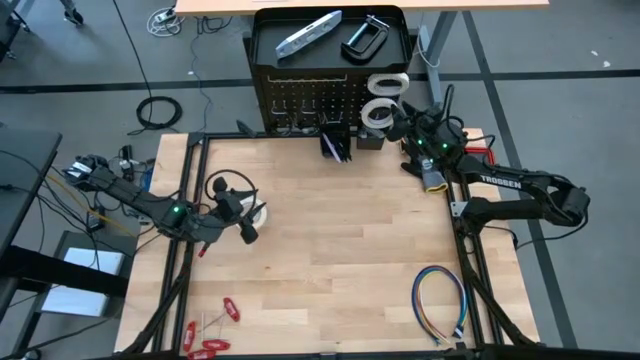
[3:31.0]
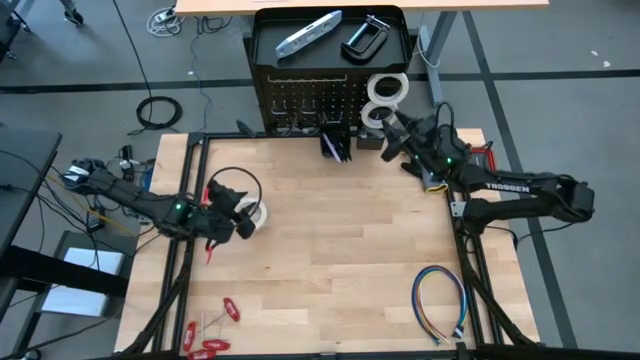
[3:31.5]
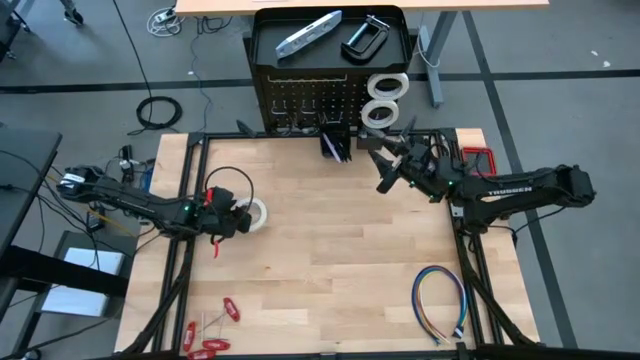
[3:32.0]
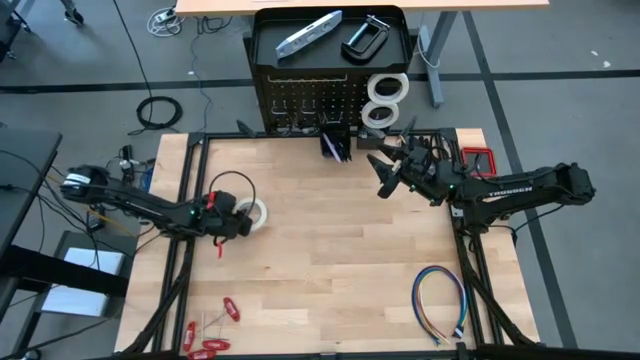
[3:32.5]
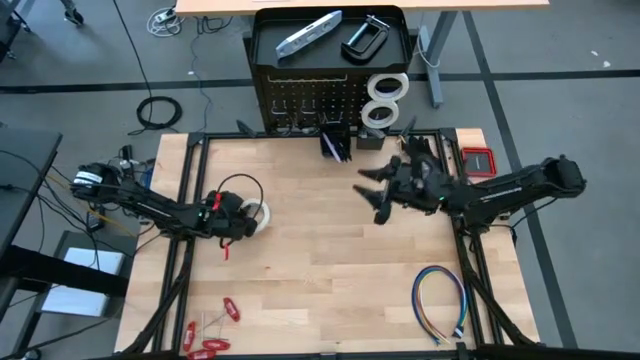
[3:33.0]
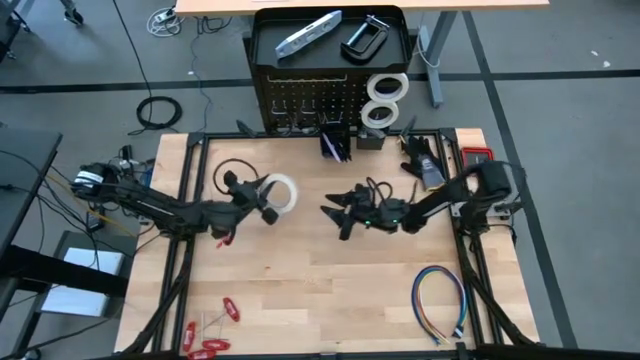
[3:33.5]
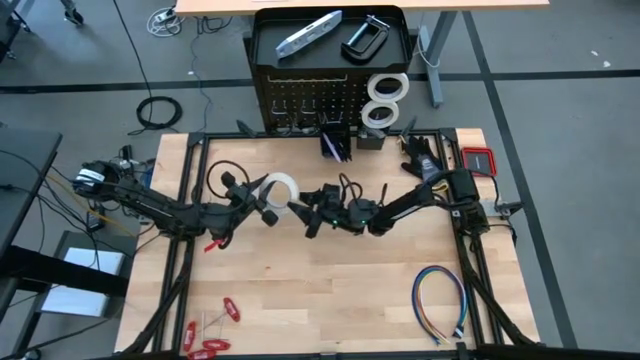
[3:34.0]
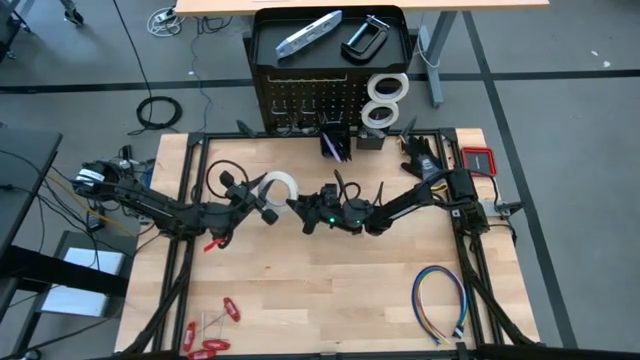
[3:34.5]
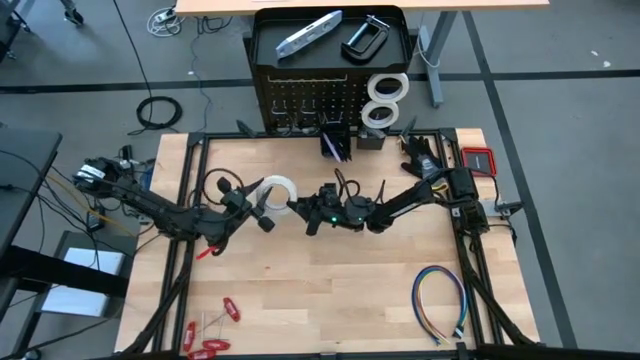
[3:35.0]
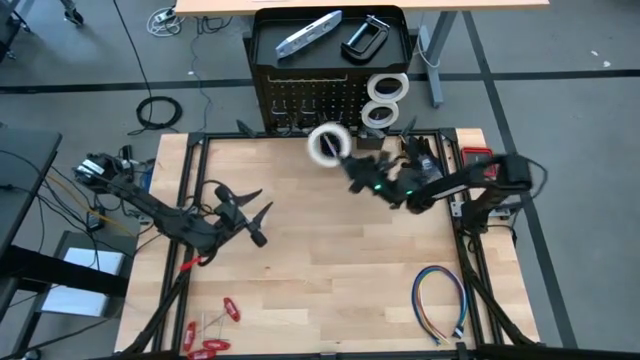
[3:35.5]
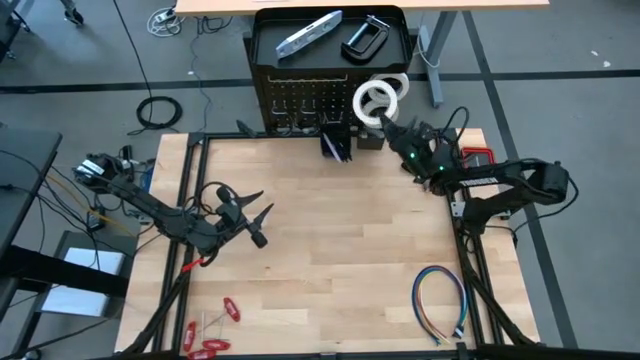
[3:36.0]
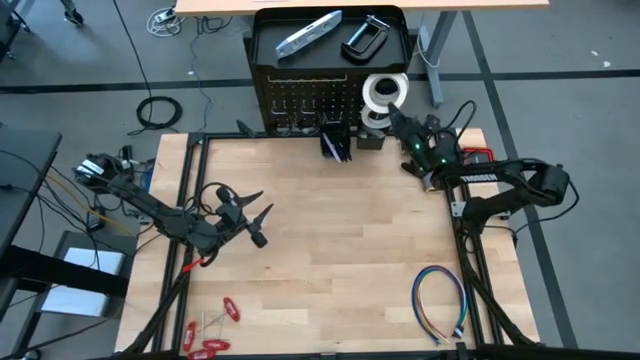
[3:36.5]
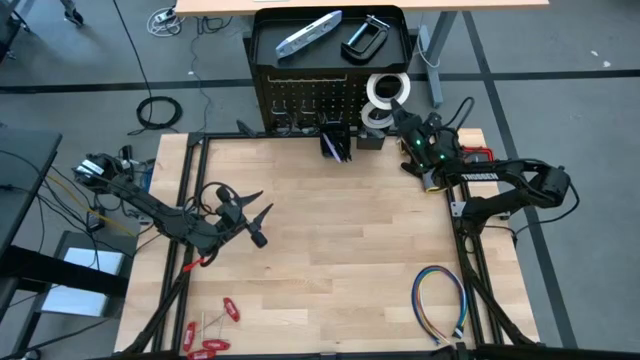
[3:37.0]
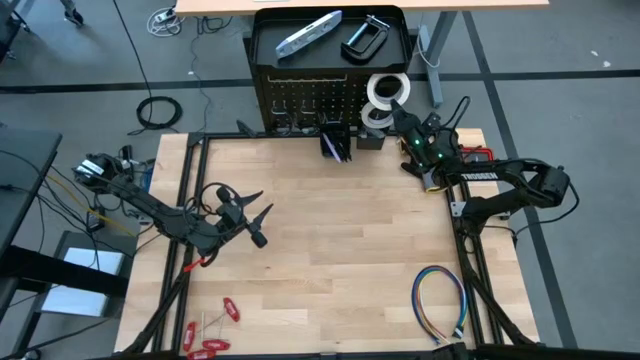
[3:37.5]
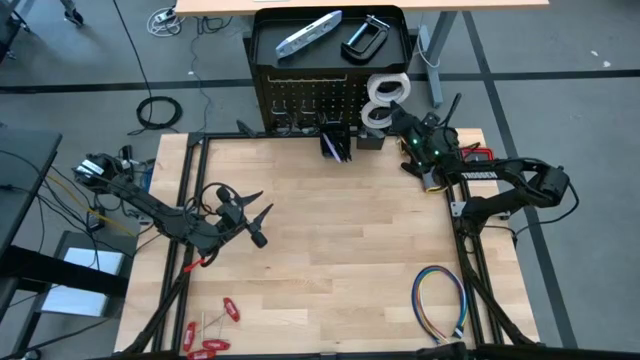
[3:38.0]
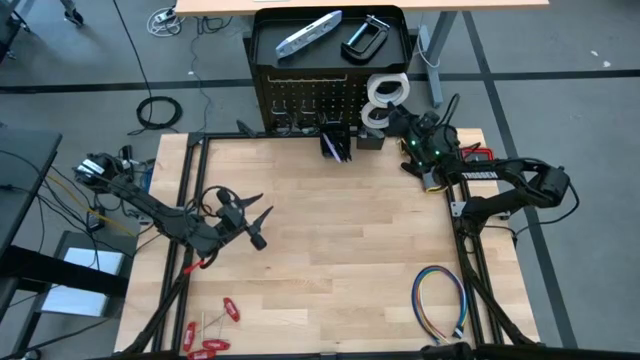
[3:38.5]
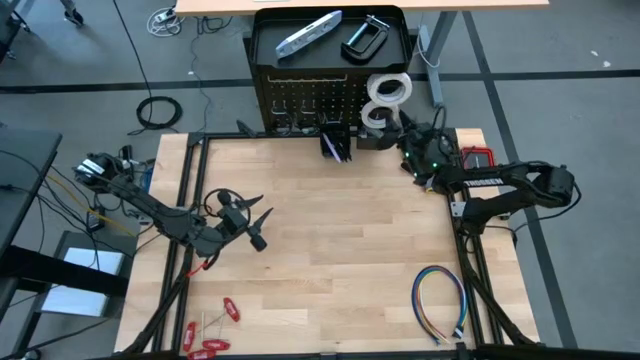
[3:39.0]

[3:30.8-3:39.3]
Task: Hang tools onto peg board
Hang the white masking tape on the peg board

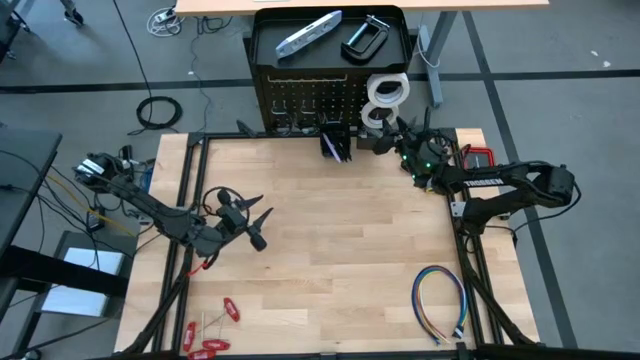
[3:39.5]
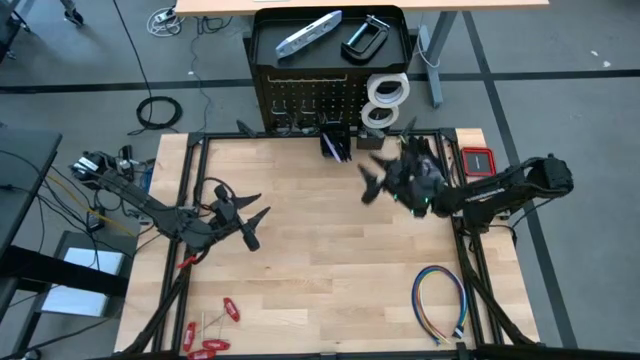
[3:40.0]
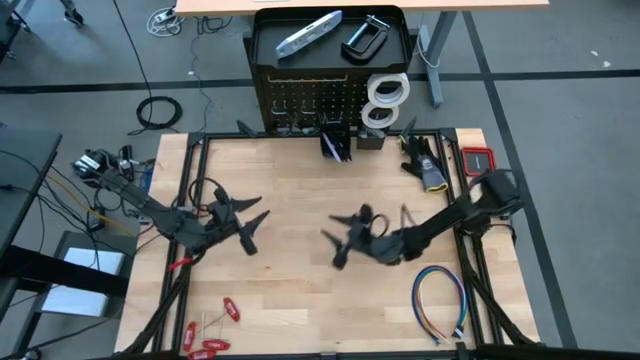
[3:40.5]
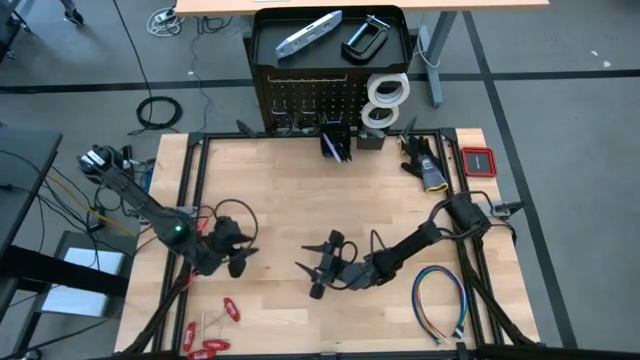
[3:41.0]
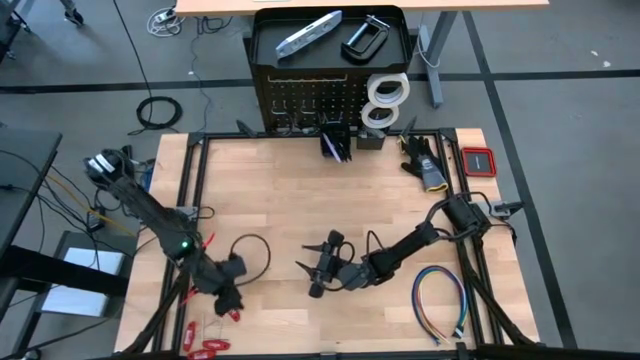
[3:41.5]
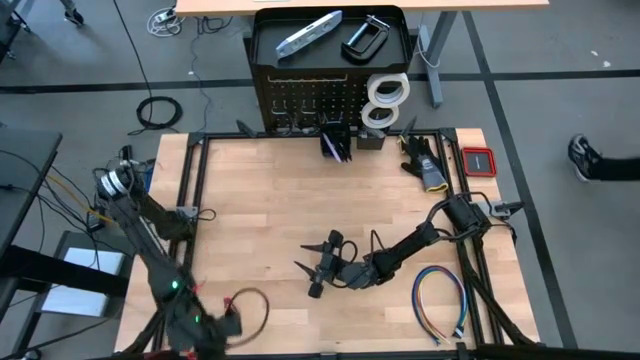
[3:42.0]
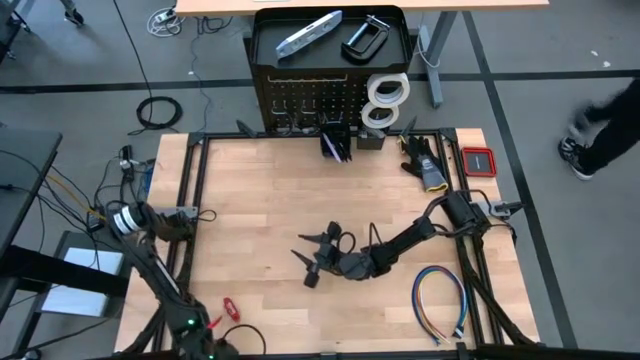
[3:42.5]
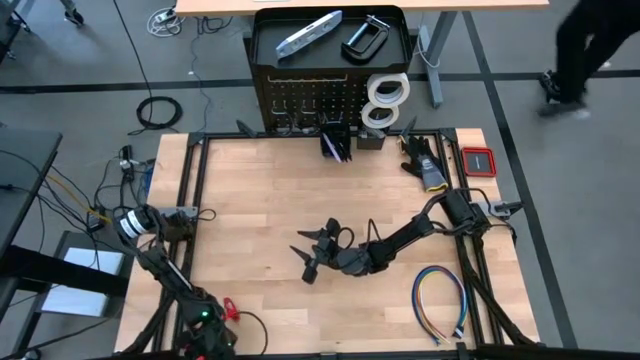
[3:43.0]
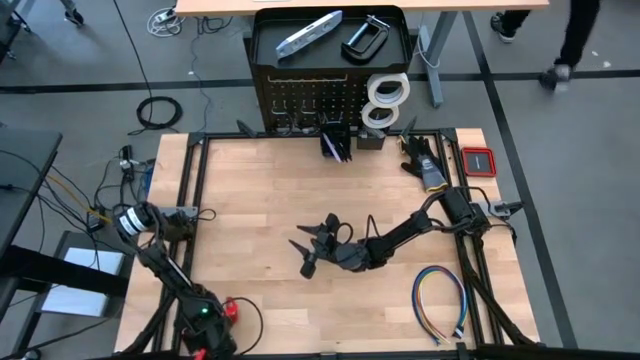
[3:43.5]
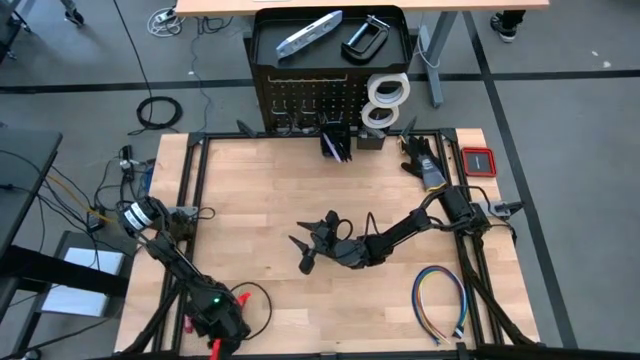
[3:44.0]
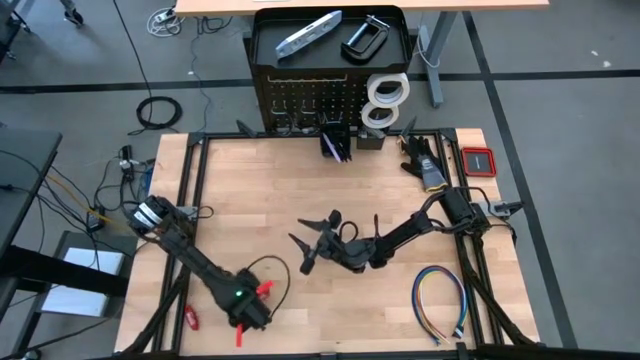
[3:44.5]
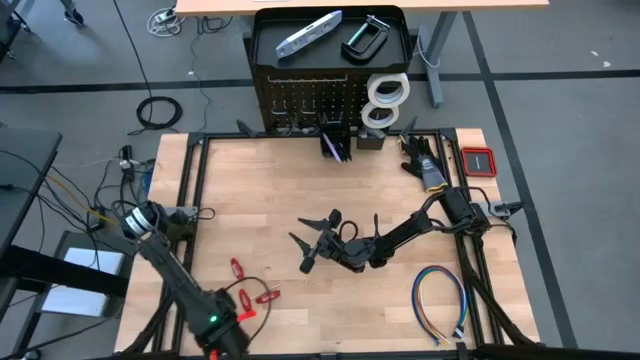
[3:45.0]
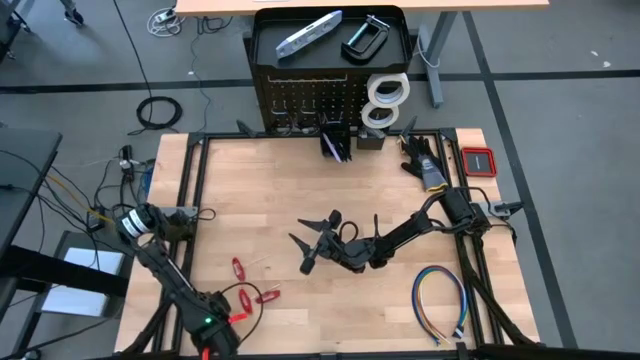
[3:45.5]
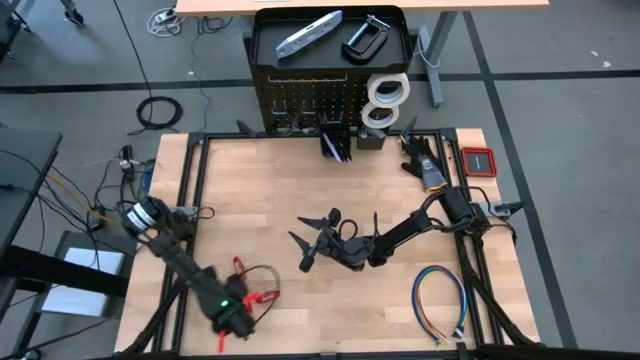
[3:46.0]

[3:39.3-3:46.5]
Adjust the red allen wrenches

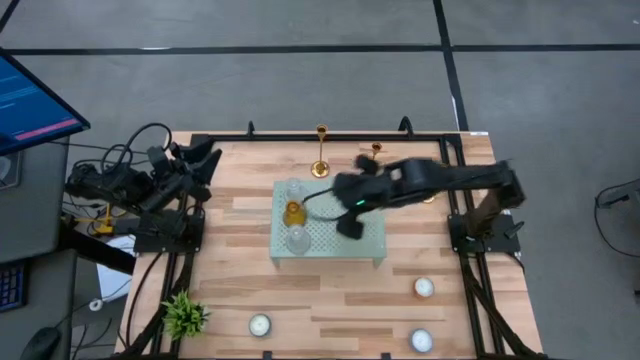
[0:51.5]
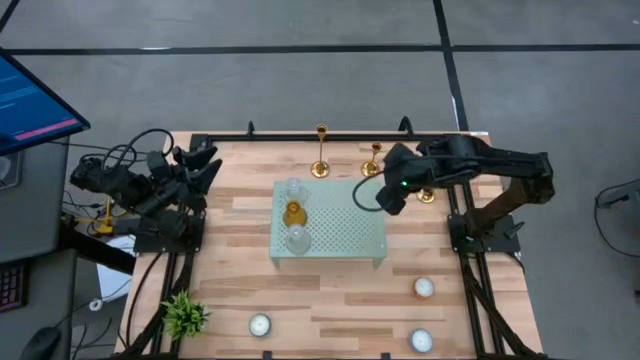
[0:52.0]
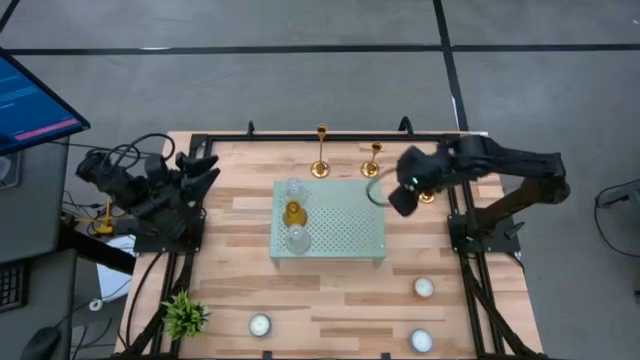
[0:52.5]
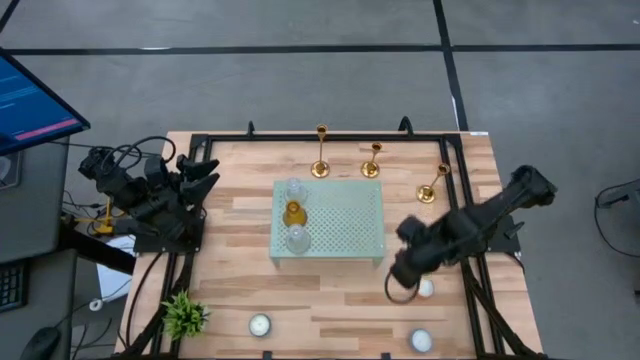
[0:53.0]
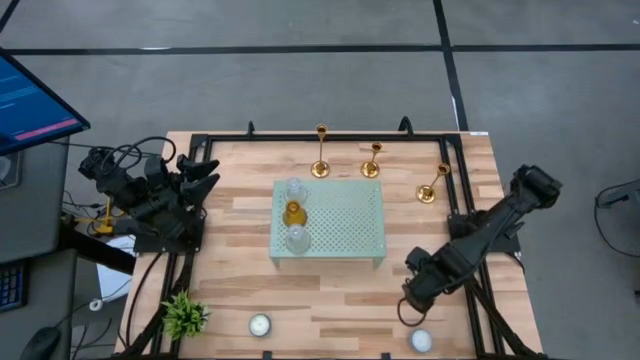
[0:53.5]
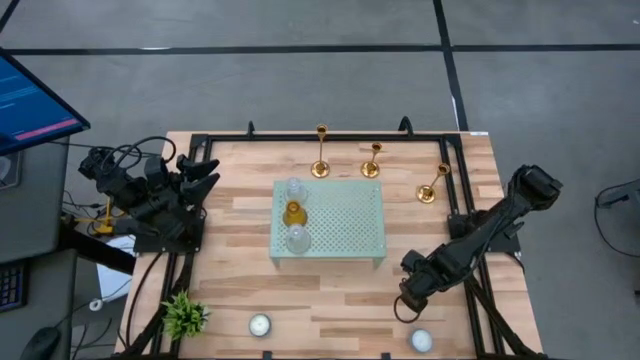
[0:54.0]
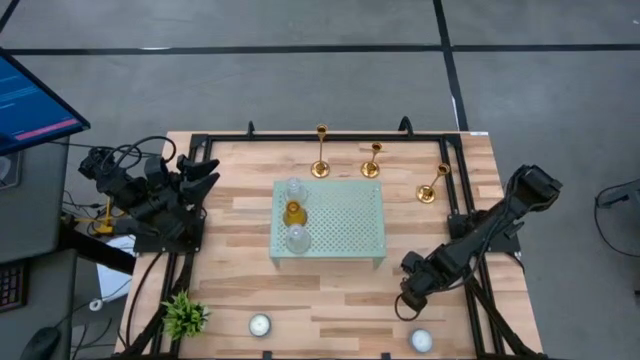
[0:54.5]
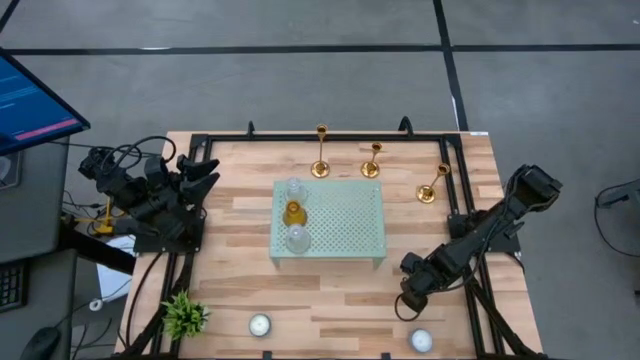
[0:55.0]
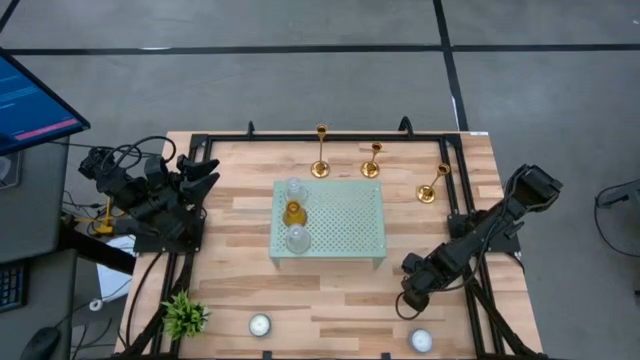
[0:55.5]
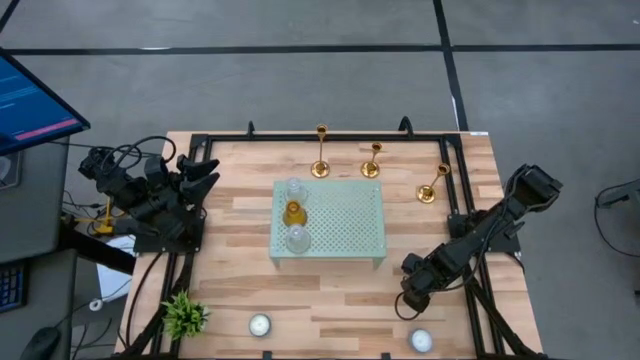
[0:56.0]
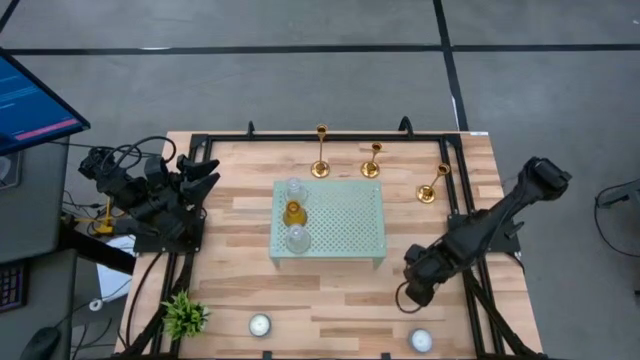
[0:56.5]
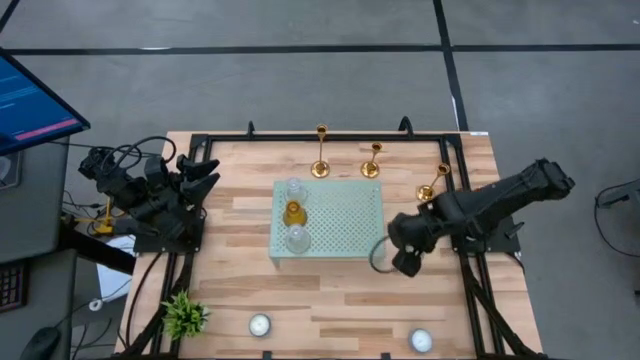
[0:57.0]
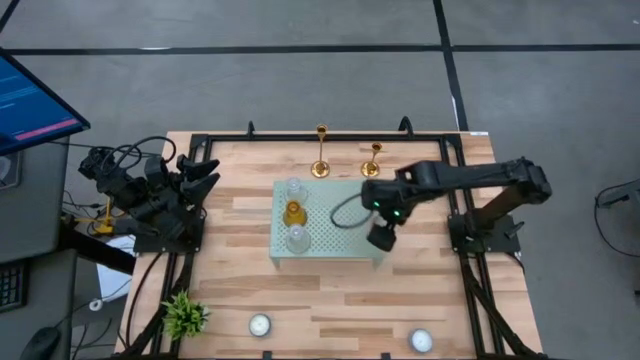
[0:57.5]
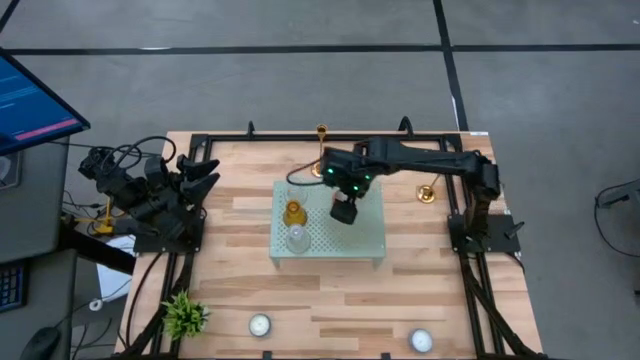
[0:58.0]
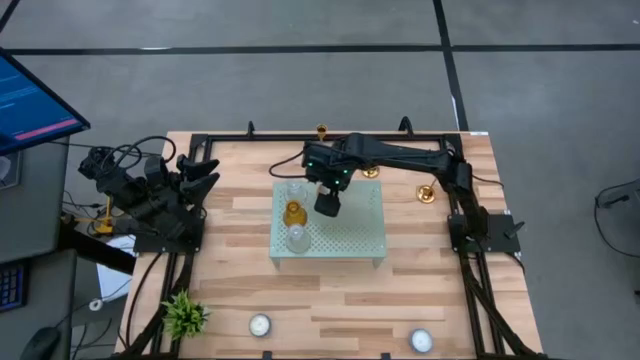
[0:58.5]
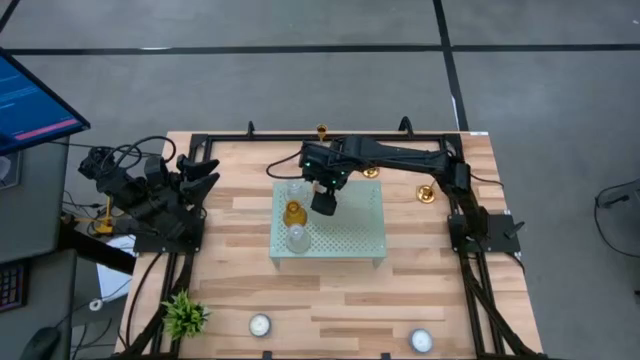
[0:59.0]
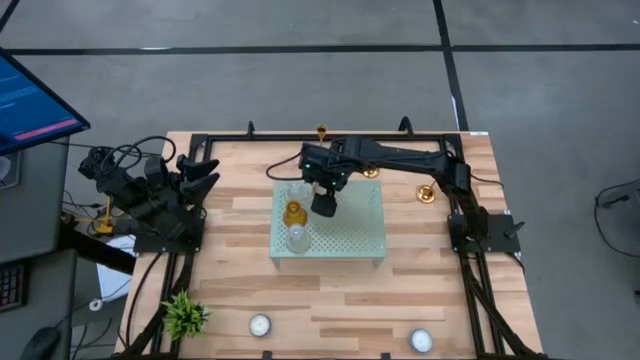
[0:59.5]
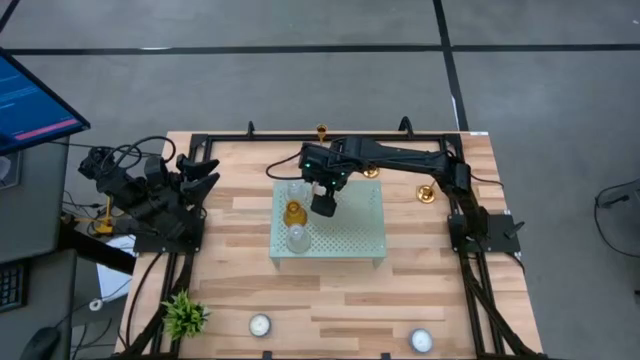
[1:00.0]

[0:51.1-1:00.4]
Task: Pick & Place candle stick holders
Put the orange scented candle on the shelf
